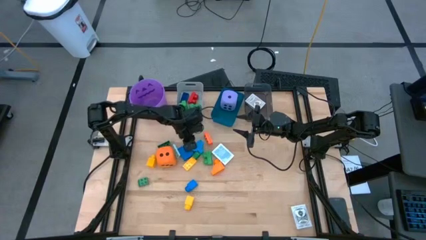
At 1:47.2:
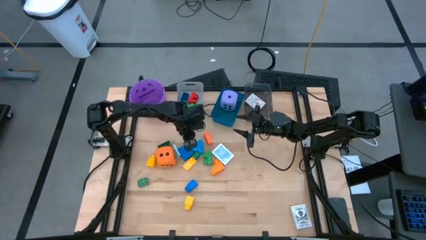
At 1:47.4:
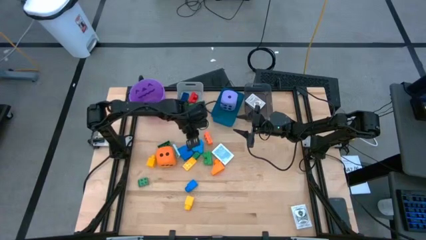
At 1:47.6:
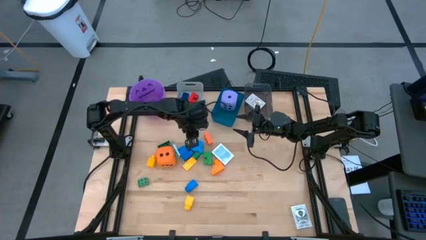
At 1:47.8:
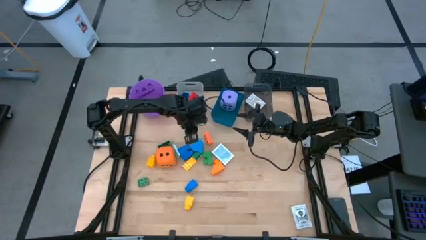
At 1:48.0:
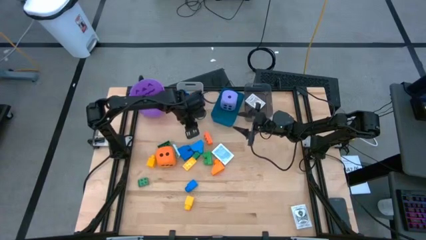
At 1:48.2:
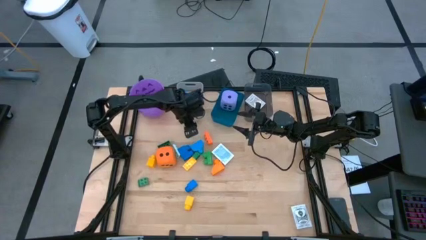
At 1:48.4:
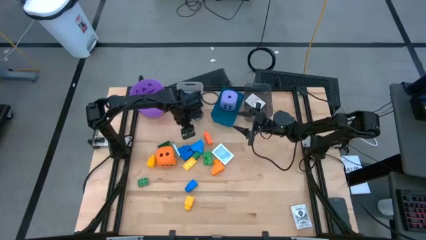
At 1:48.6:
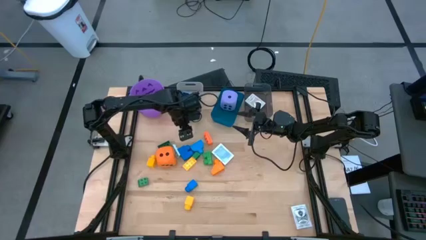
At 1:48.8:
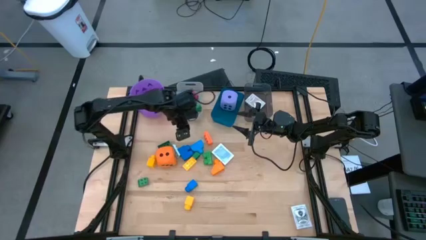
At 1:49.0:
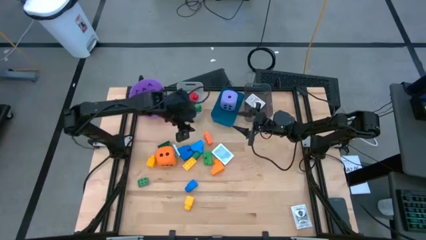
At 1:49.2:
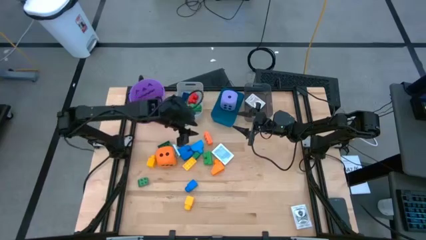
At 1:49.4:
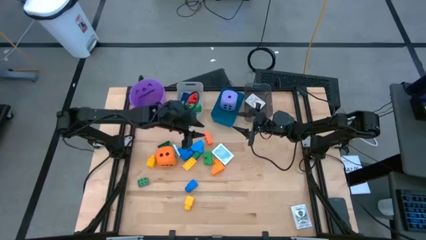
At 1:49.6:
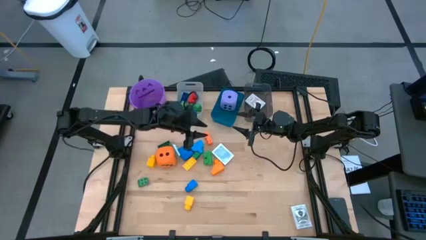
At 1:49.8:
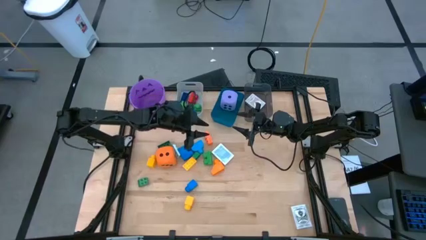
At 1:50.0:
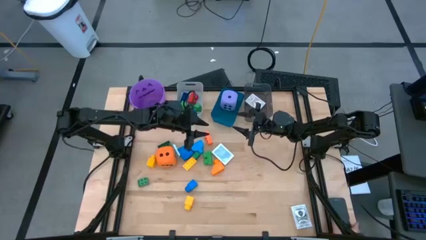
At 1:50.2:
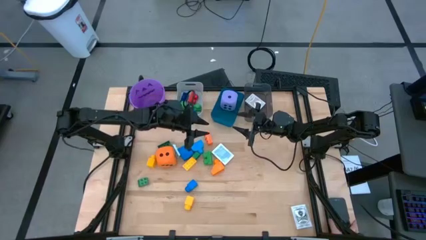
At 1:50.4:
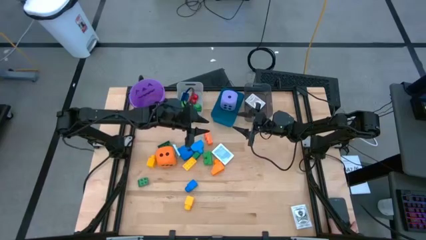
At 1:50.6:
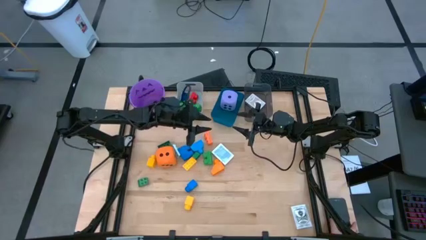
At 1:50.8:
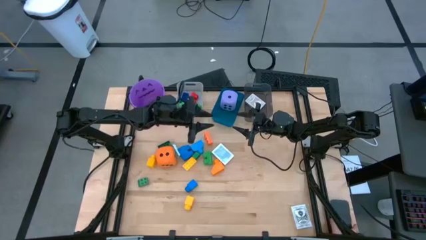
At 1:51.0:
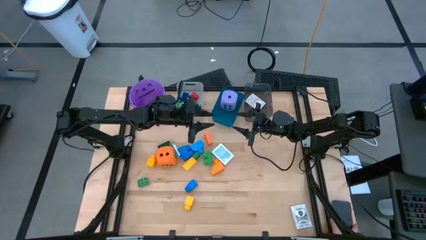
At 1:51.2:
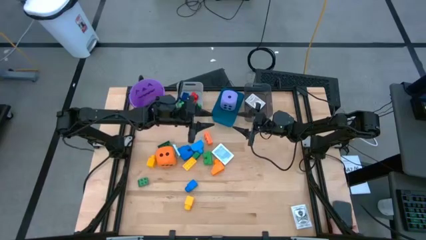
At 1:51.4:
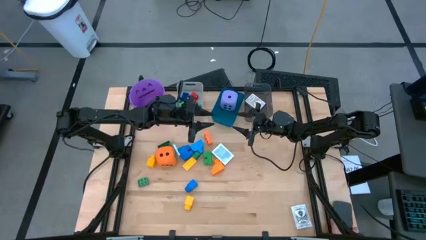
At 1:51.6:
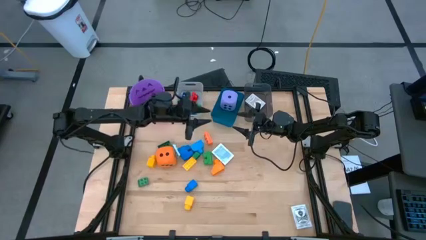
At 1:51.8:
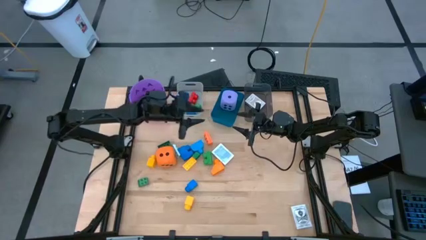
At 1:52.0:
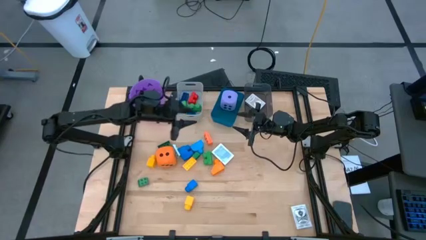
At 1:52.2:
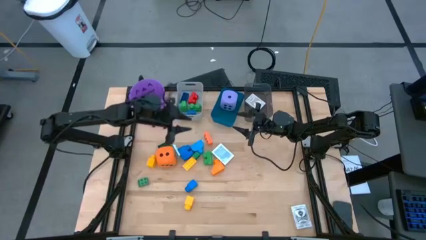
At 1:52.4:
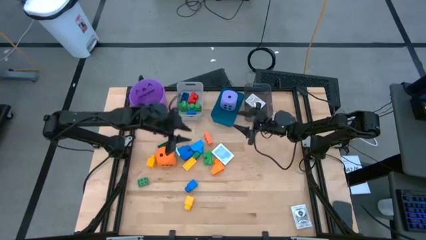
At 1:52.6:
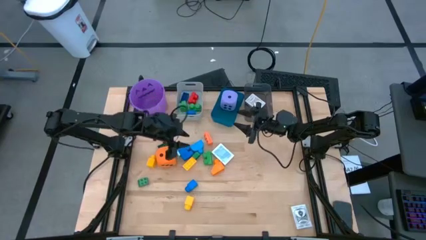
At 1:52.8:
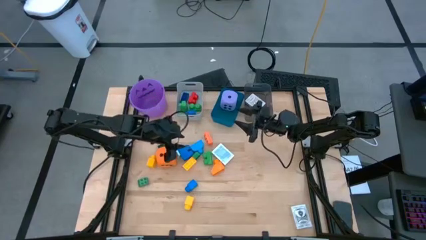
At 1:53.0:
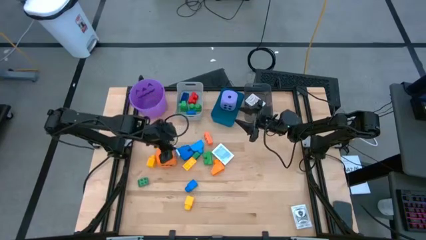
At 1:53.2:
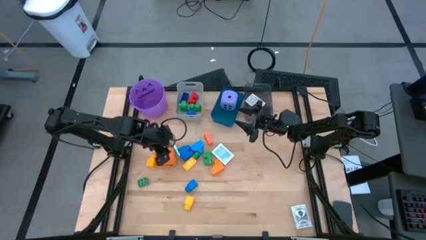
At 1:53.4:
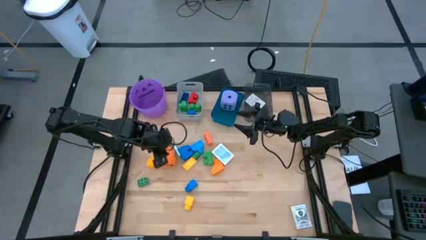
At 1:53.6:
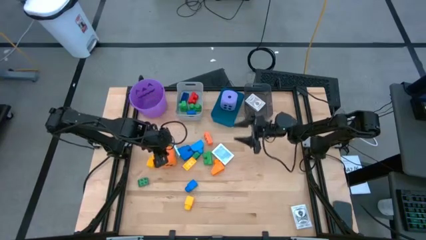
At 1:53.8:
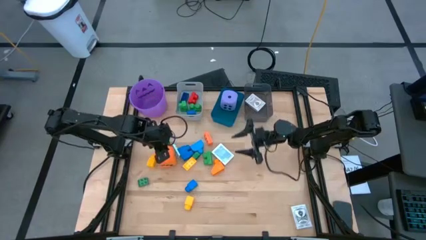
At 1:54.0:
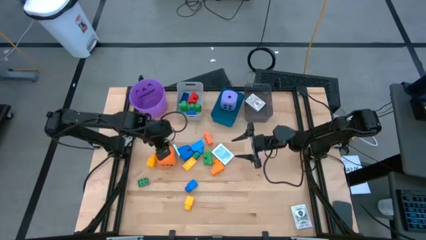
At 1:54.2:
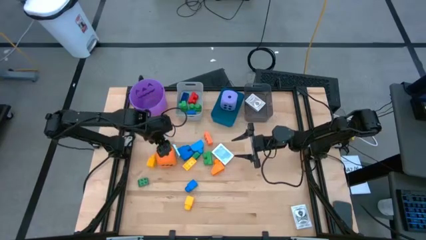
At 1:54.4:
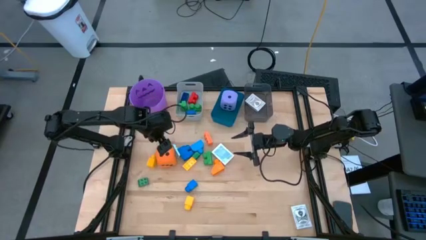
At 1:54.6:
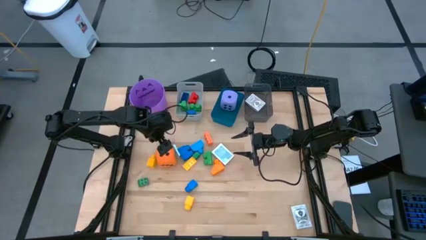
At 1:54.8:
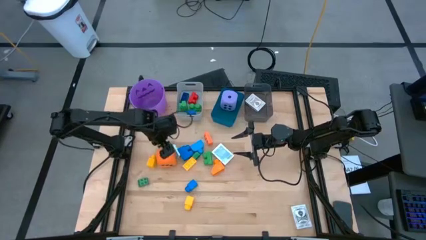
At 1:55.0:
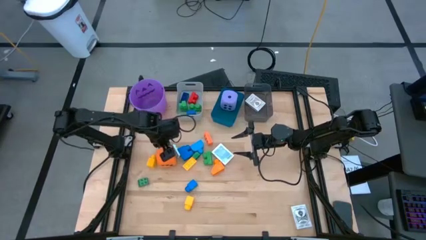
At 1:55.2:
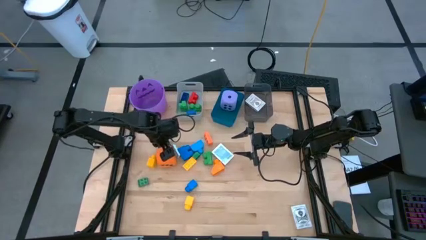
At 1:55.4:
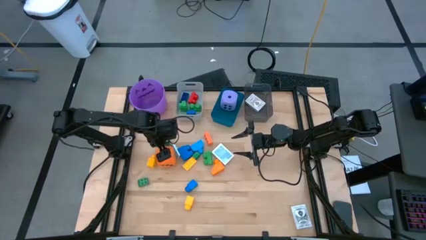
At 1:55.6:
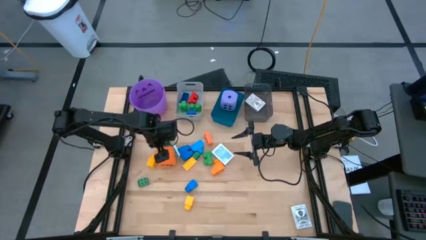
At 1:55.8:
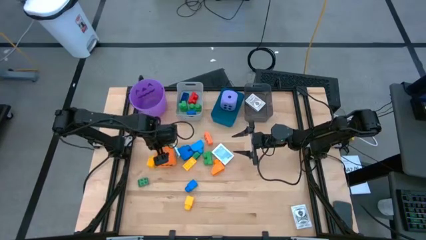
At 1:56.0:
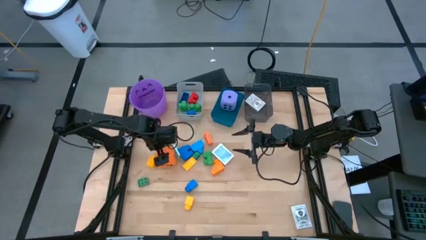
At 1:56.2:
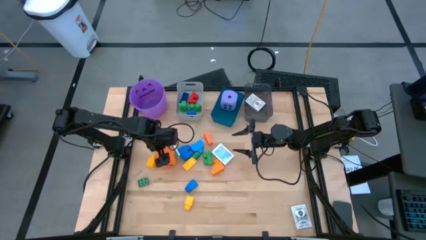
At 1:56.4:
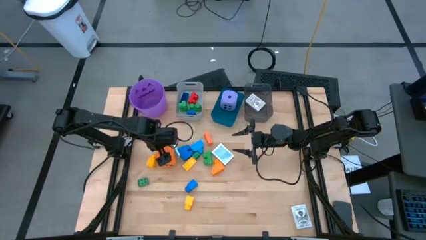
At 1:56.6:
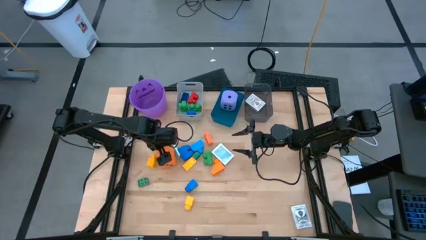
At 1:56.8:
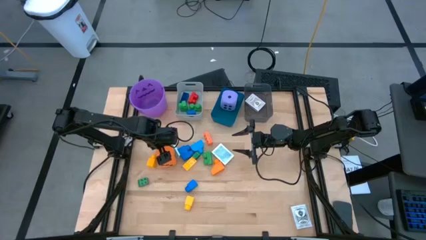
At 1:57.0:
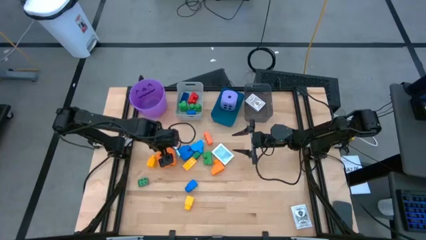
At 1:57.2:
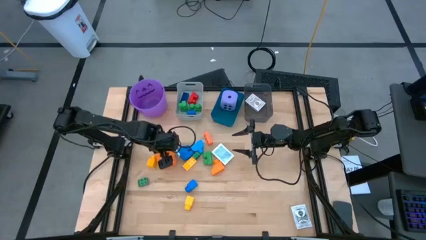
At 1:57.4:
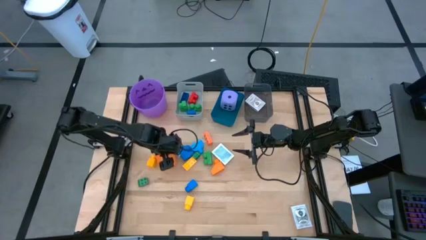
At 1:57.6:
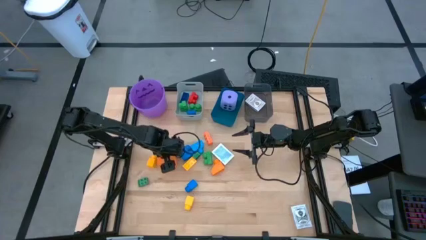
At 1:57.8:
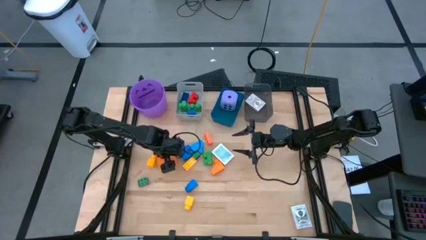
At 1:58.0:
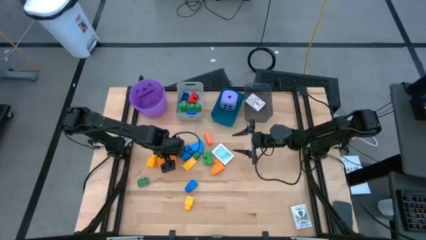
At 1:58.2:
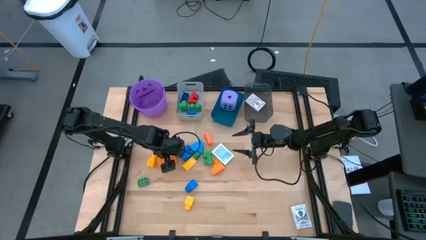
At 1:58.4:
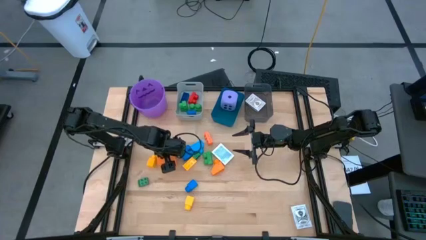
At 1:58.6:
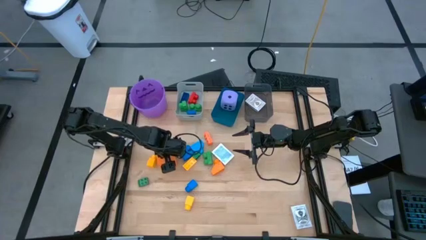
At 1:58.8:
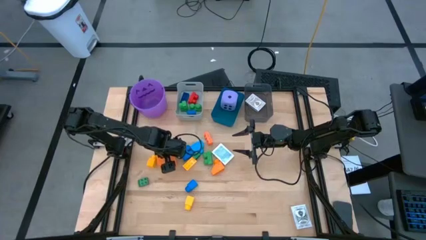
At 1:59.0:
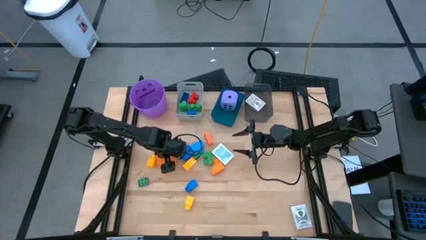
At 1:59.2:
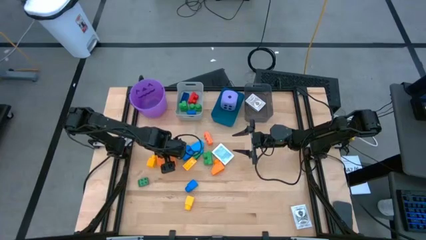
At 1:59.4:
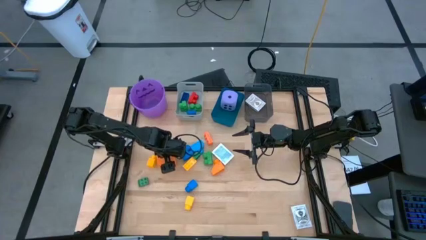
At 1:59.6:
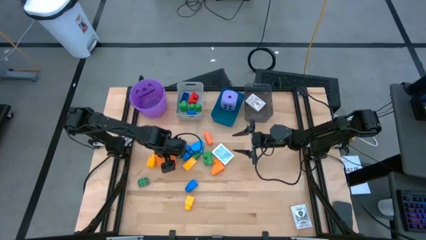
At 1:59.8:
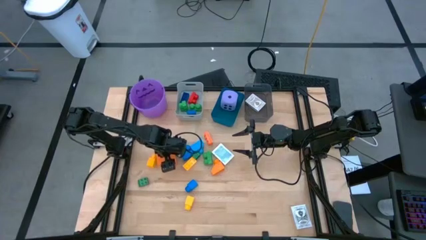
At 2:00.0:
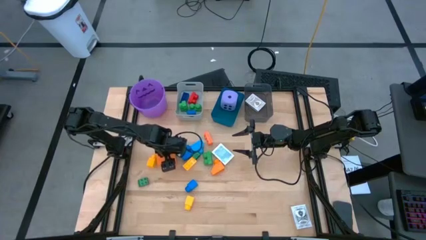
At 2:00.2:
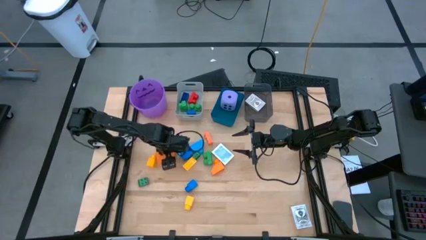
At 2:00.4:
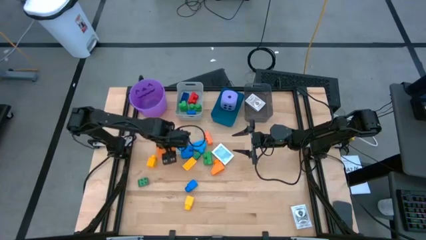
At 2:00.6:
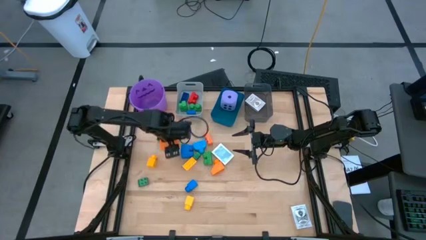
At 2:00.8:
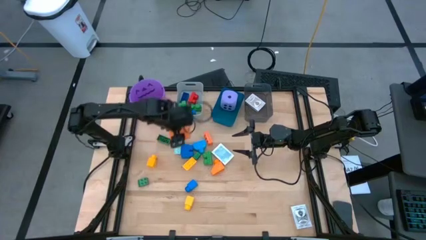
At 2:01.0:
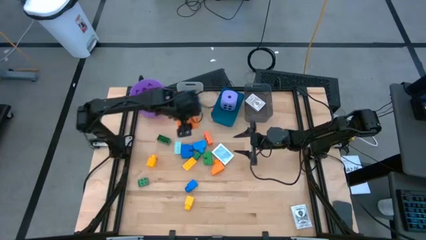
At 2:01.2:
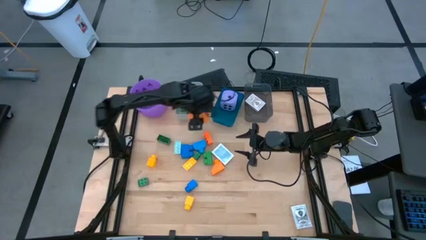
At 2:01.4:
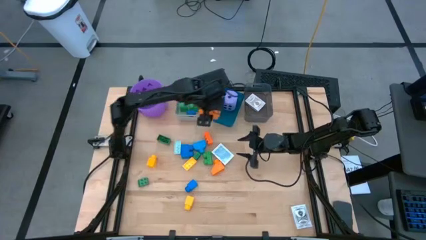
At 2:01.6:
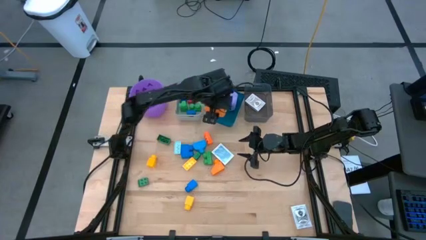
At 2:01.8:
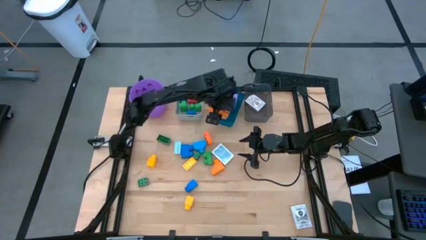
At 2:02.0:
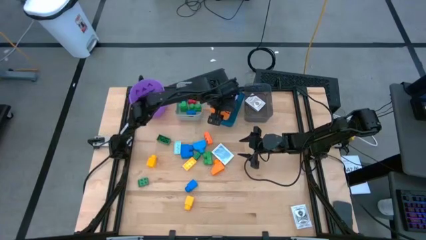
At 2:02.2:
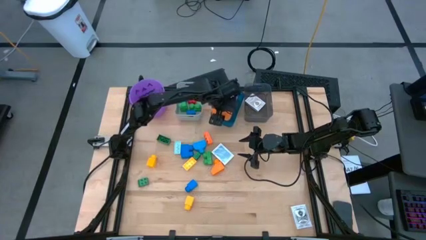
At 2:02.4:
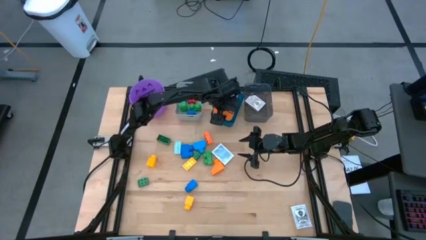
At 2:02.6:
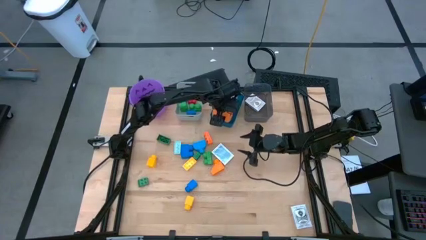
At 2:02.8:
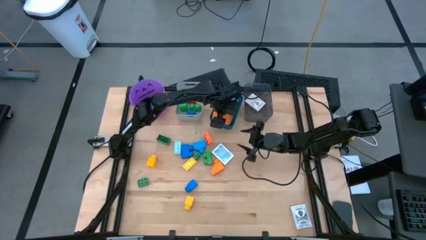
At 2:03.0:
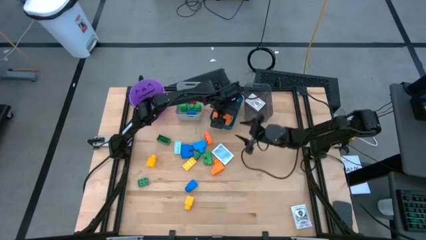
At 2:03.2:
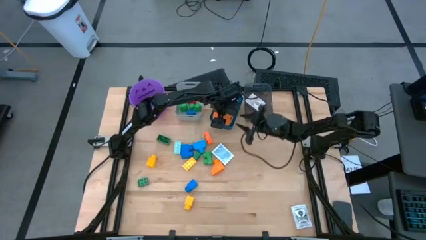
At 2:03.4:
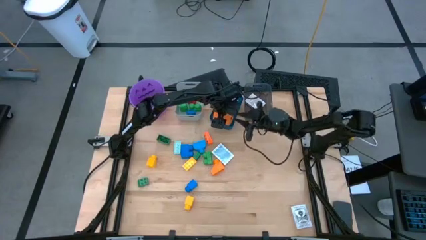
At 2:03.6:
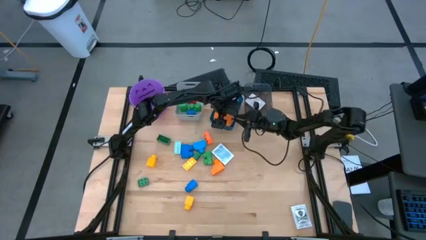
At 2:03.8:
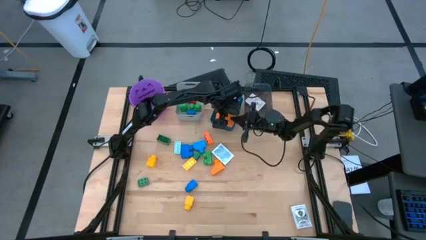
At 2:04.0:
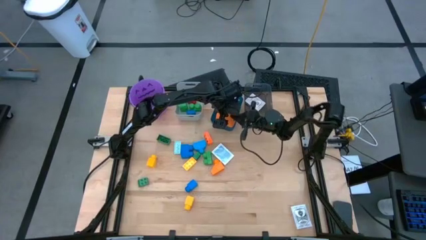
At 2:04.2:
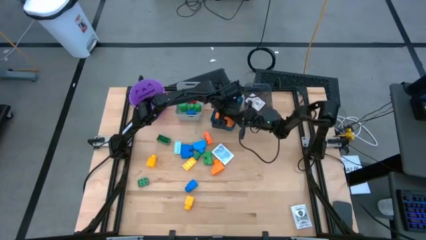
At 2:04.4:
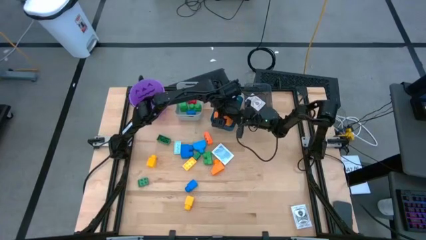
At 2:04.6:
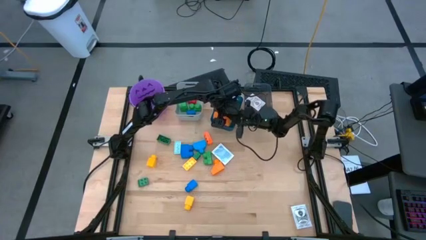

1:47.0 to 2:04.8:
Task: Pick & Place Toys
Put the orange dice into the blue bin
